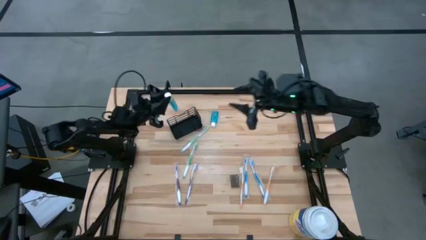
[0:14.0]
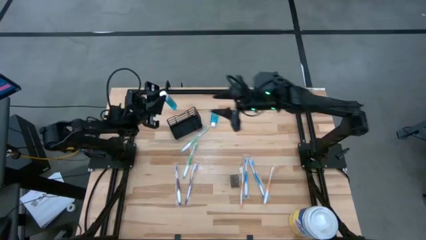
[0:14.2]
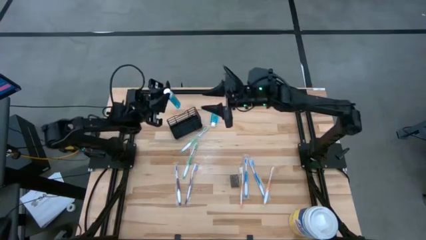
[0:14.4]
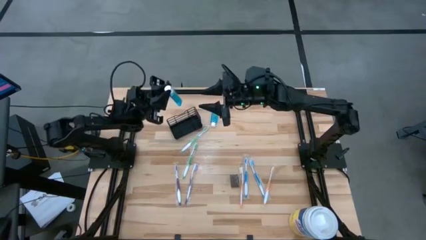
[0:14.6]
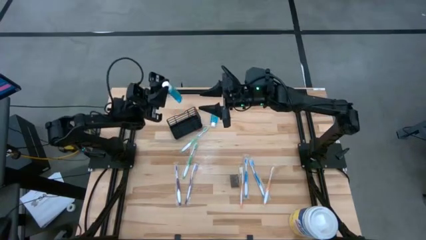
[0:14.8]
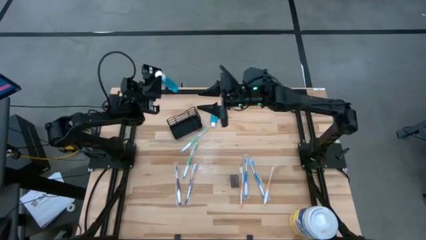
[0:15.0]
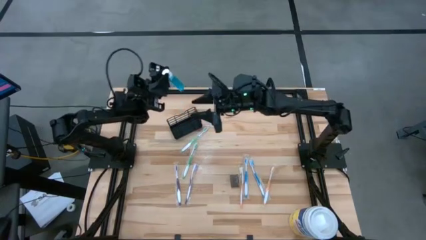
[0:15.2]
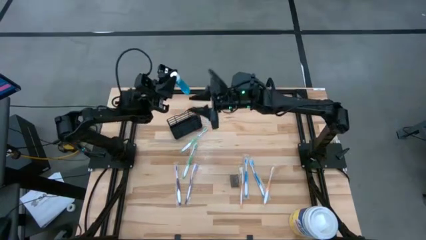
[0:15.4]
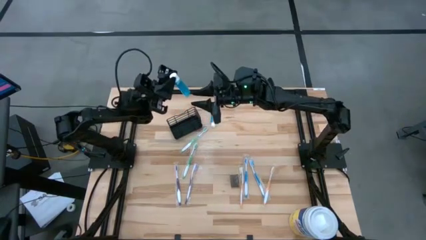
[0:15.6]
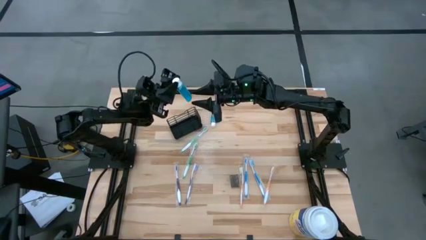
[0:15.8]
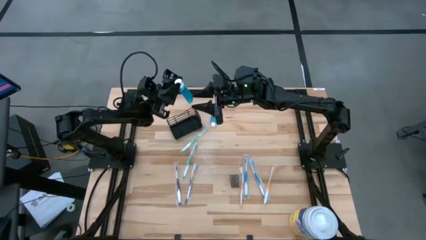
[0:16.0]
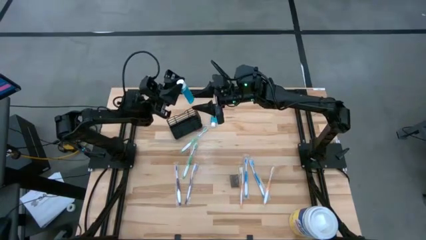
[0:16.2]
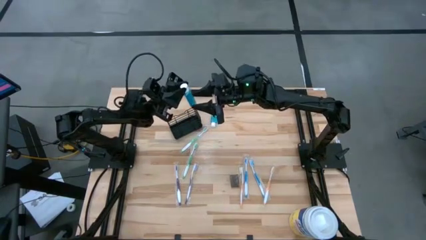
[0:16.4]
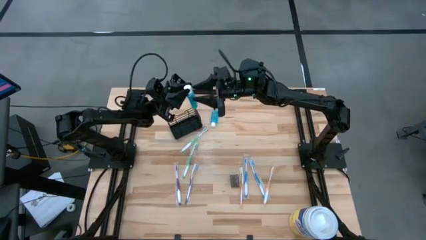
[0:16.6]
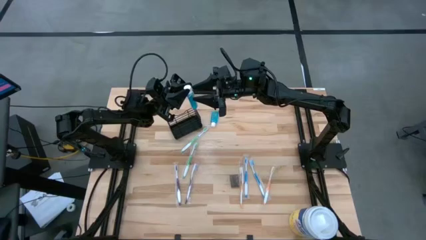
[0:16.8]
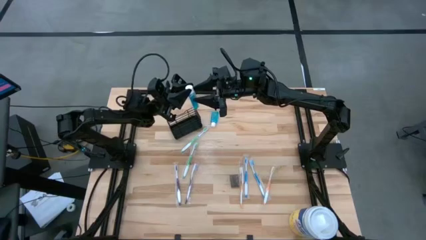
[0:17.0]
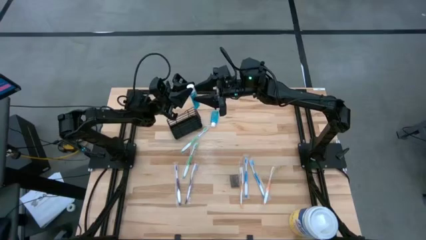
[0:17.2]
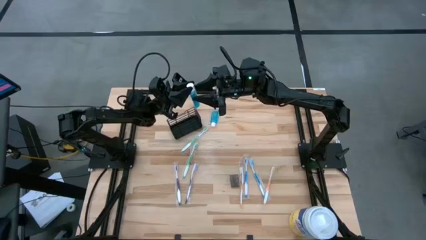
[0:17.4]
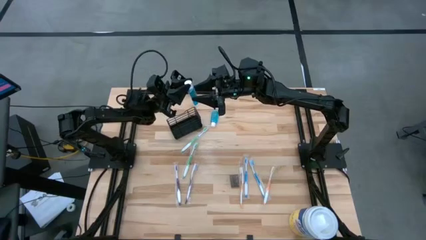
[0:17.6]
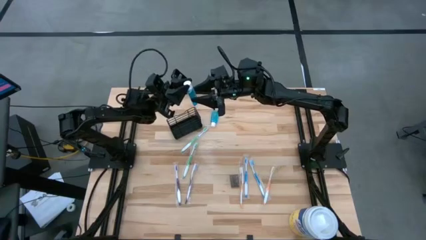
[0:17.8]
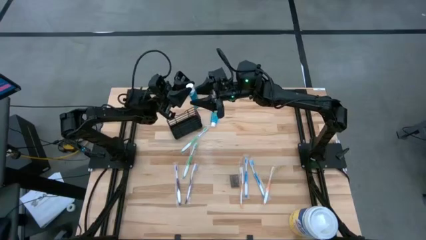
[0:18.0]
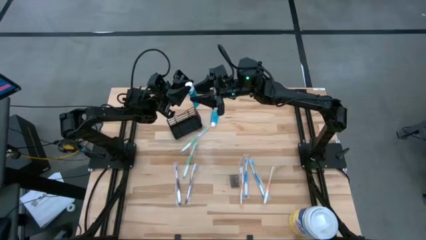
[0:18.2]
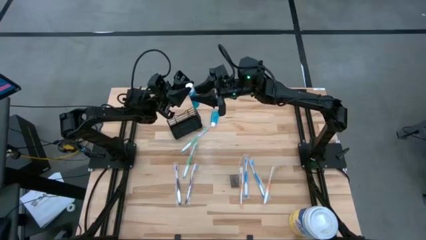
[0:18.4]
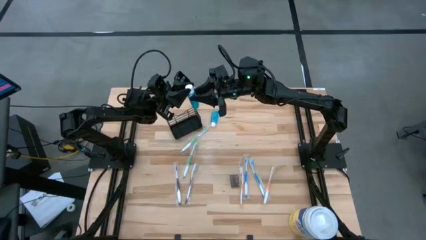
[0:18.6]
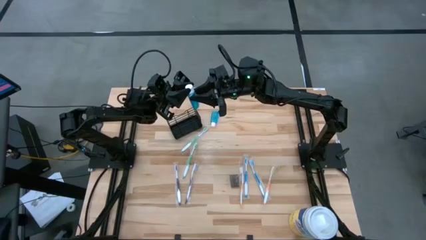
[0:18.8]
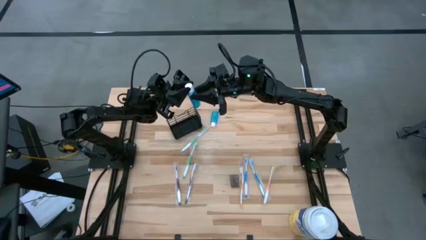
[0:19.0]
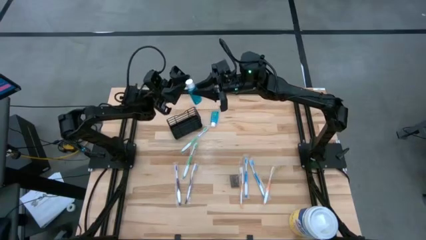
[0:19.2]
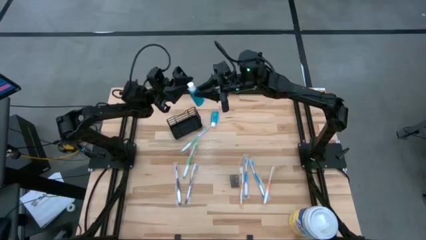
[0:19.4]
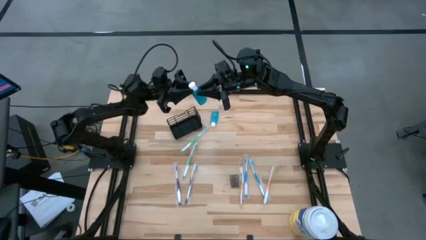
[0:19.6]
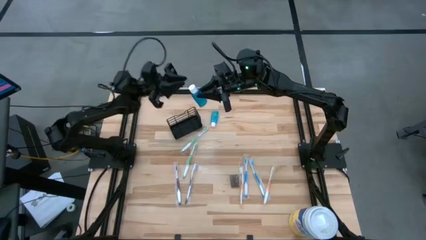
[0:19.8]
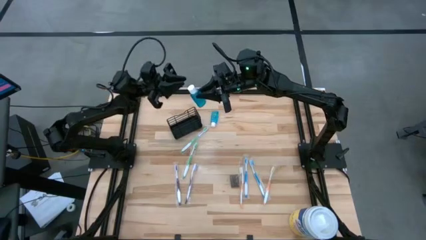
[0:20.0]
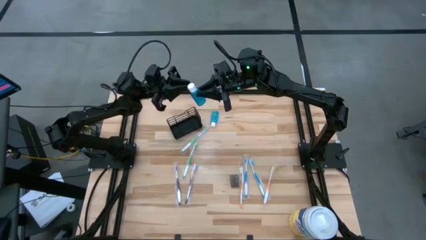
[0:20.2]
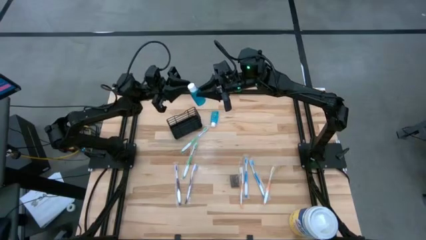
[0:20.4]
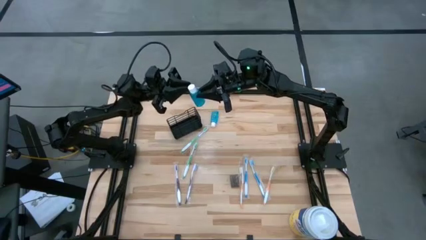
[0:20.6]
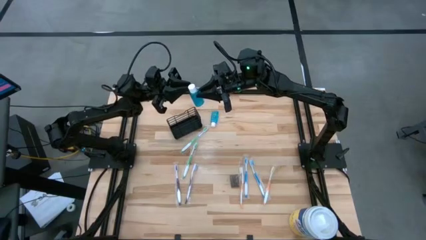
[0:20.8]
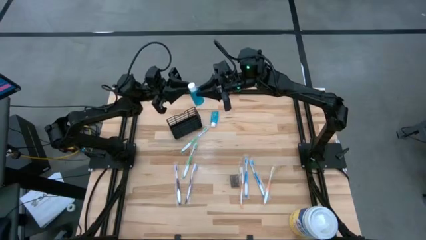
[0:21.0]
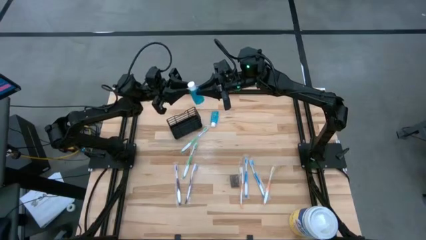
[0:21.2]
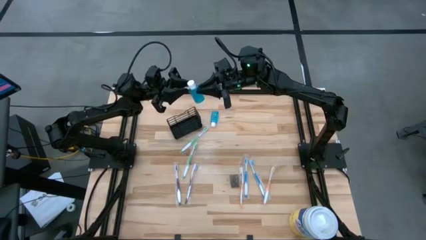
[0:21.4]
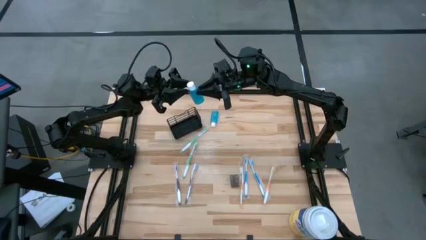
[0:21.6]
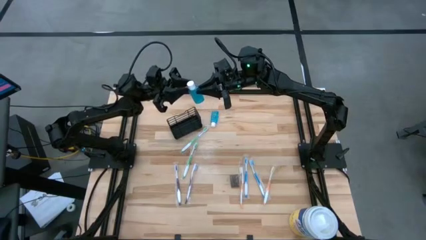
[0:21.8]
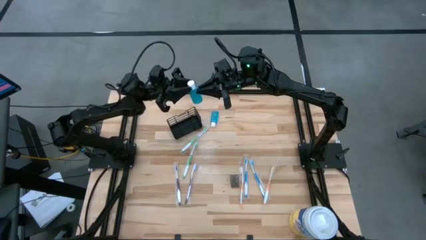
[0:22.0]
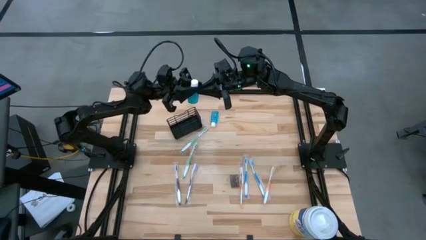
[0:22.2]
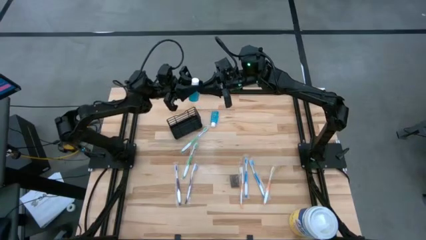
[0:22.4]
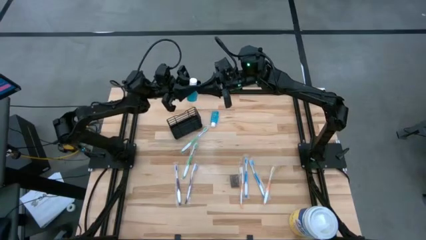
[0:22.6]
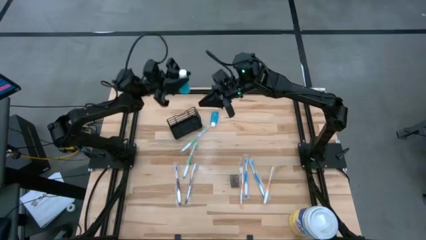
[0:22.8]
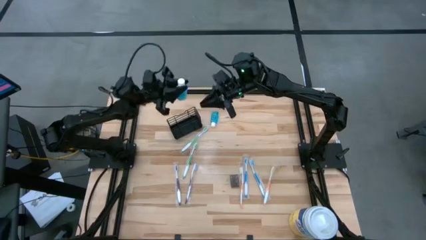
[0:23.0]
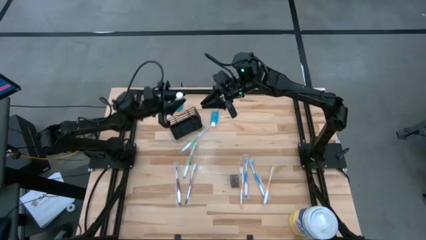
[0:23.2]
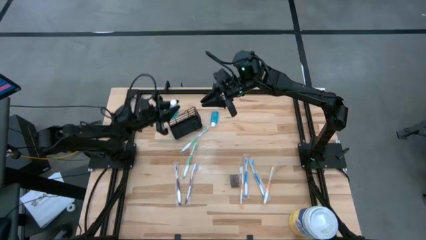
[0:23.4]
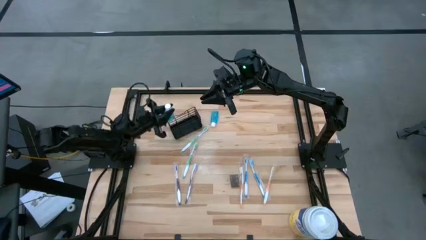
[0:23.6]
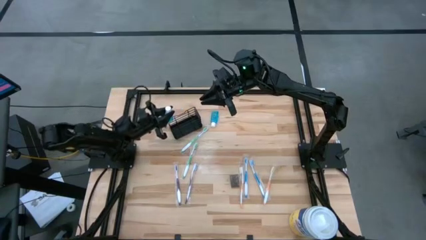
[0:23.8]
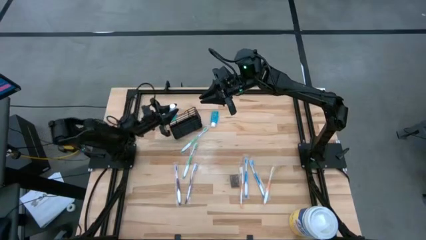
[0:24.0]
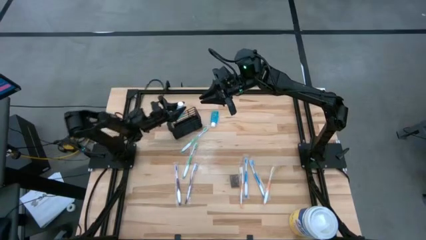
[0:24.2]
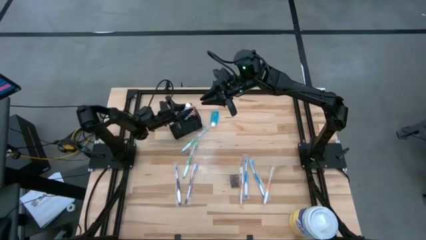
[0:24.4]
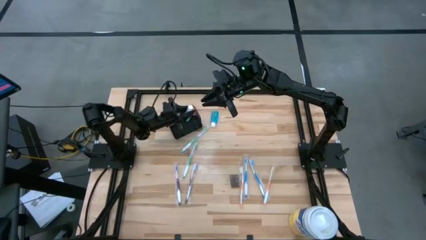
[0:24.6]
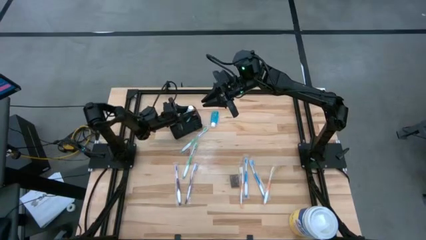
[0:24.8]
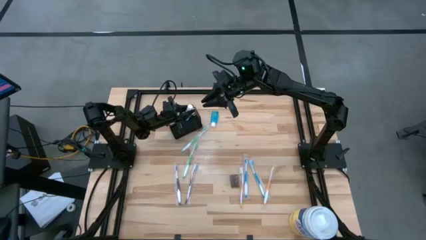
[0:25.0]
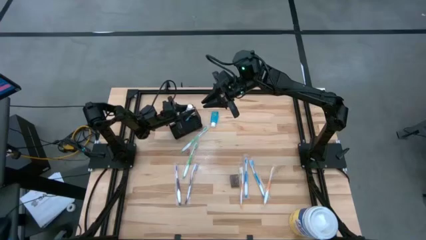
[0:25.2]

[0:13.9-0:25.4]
Task: Pick & Place toothbrushing station
Put the blue mouthwash into the black organizer
